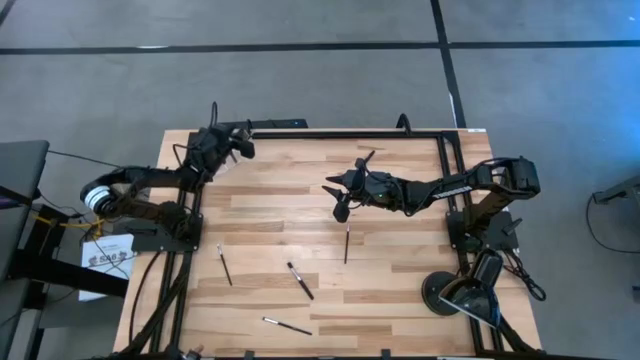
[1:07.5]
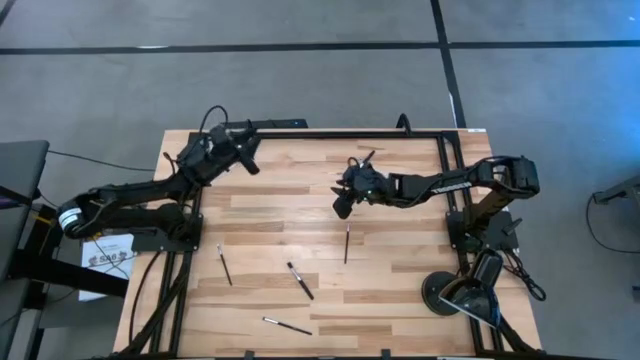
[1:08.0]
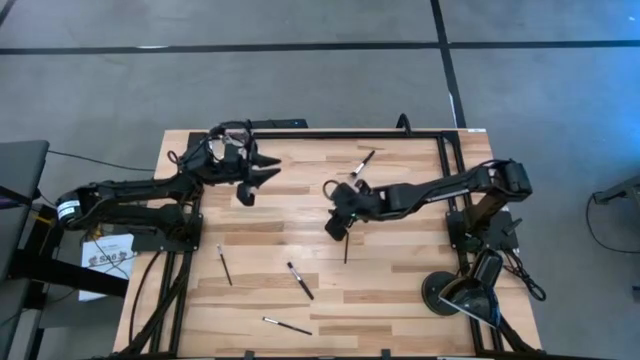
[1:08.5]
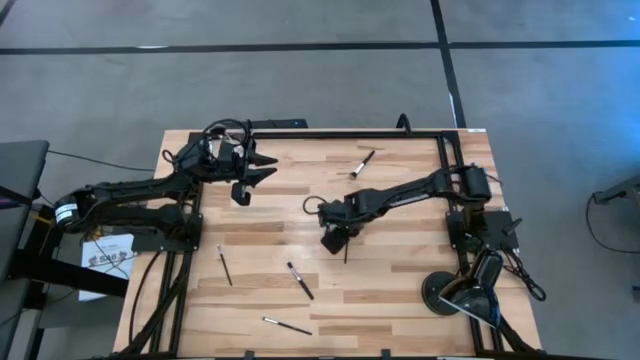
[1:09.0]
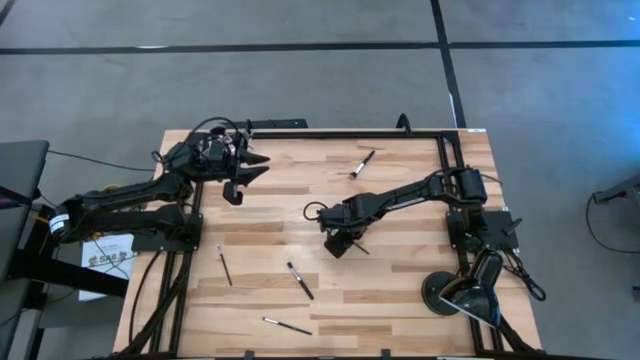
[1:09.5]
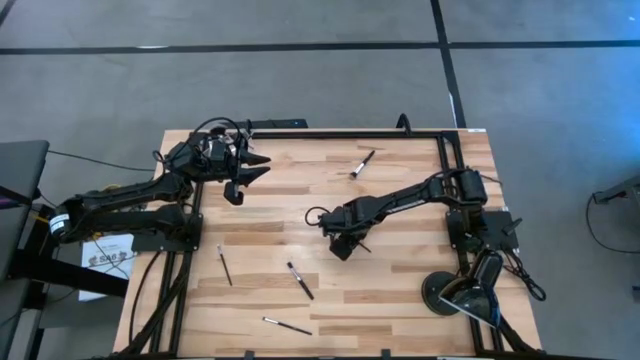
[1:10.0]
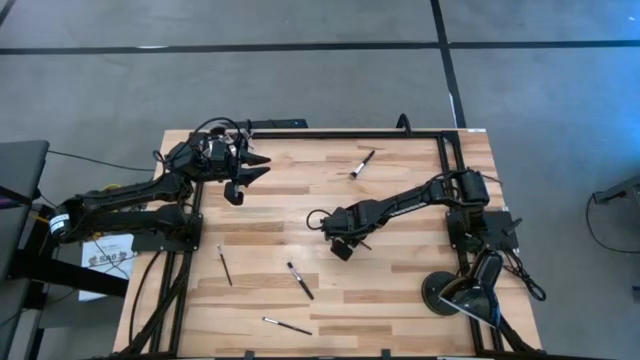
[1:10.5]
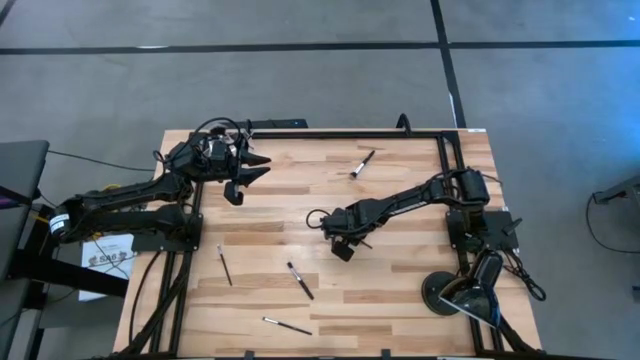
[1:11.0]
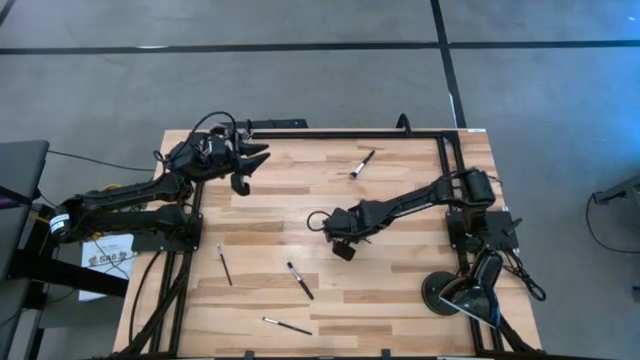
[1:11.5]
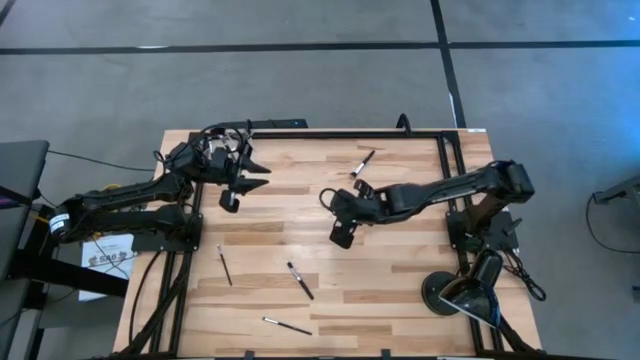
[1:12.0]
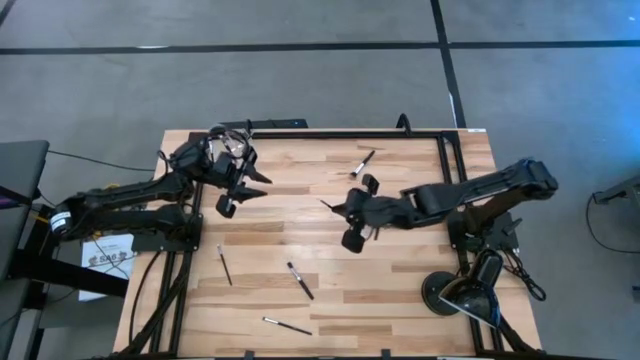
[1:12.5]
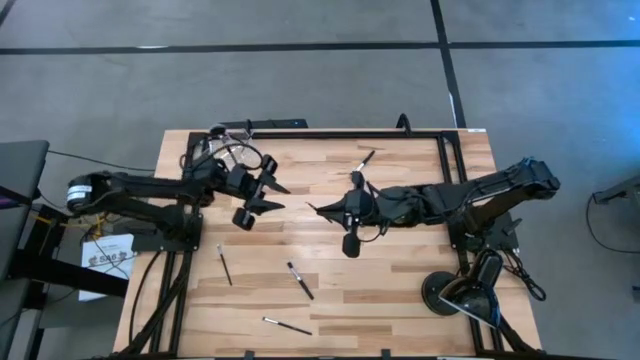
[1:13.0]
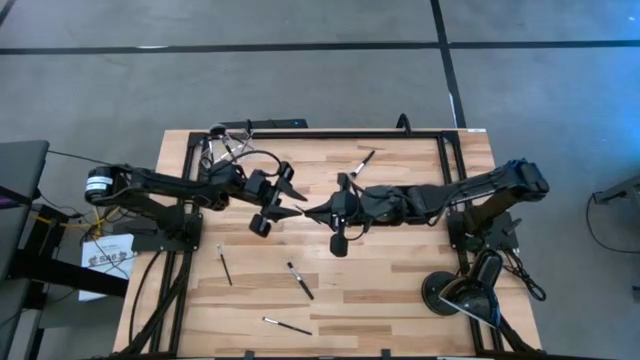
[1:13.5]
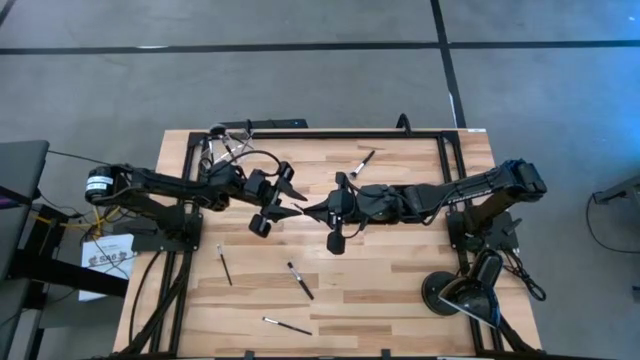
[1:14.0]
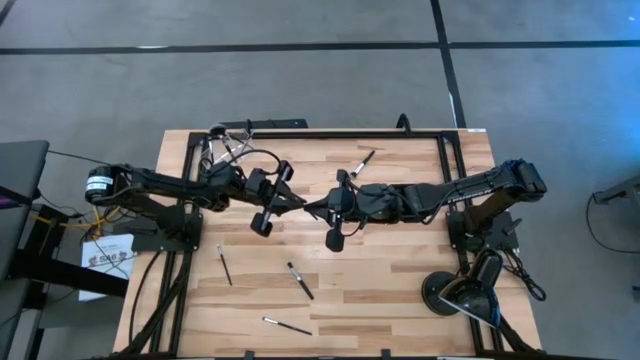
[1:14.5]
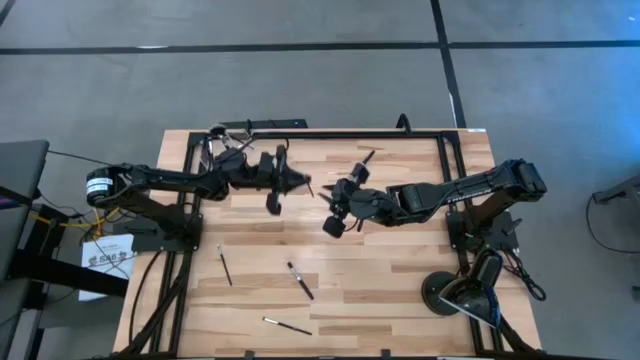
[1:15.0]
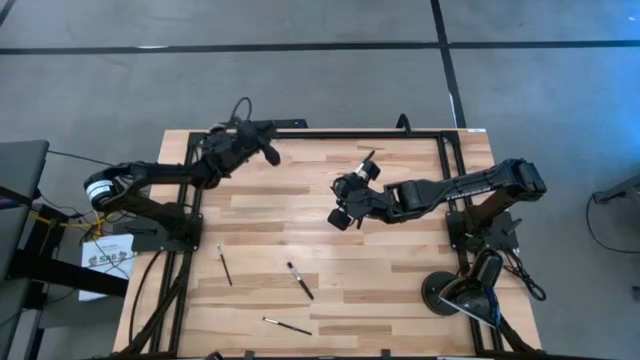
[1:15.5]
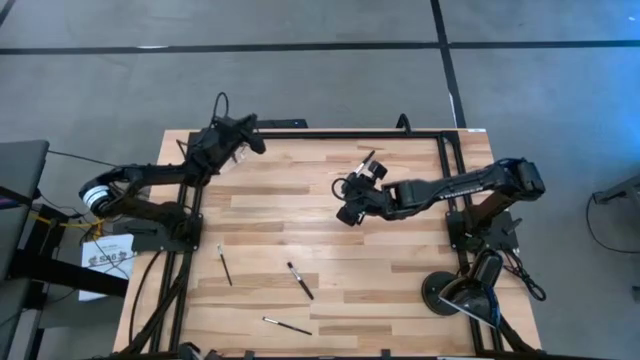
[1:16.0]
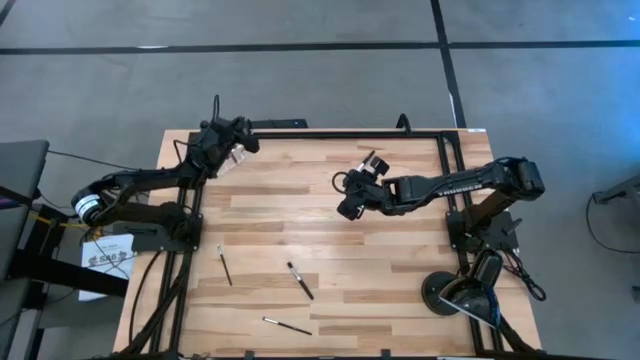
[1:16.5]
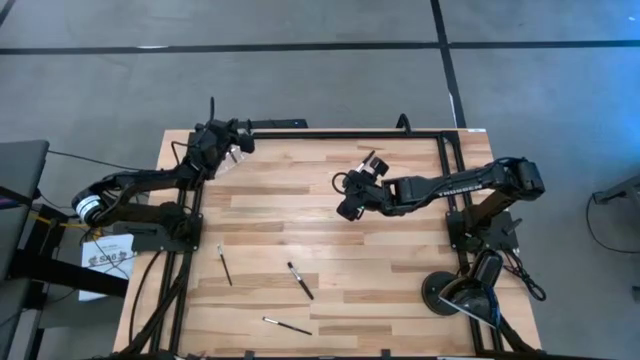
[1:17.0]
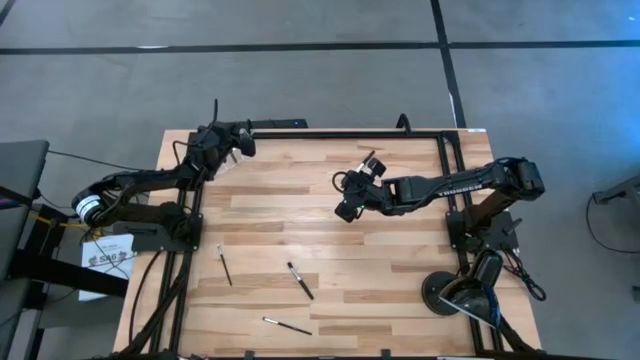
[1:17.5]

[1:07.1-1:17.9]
Task: Put items in baskets/containers
Put the liner brush into the transparent bin

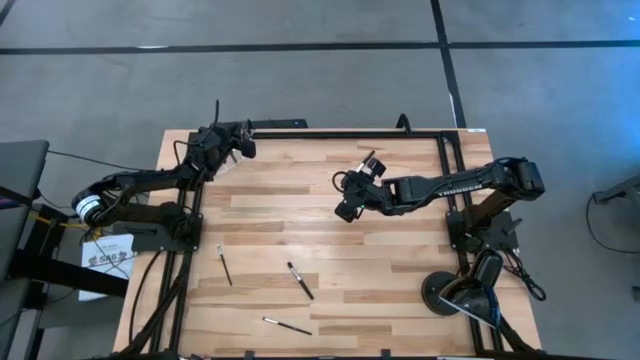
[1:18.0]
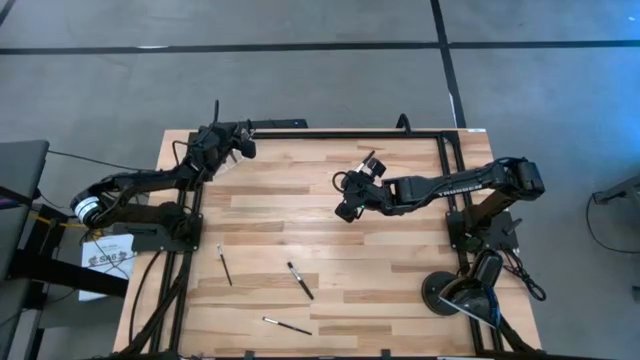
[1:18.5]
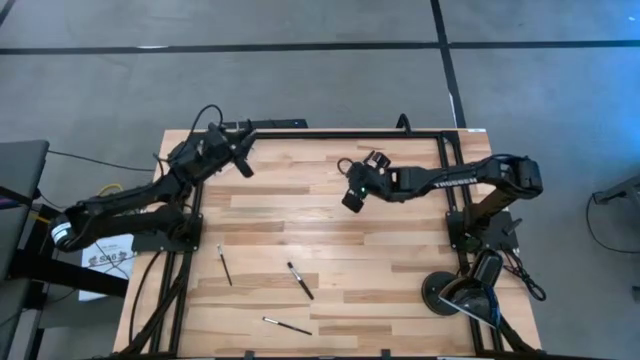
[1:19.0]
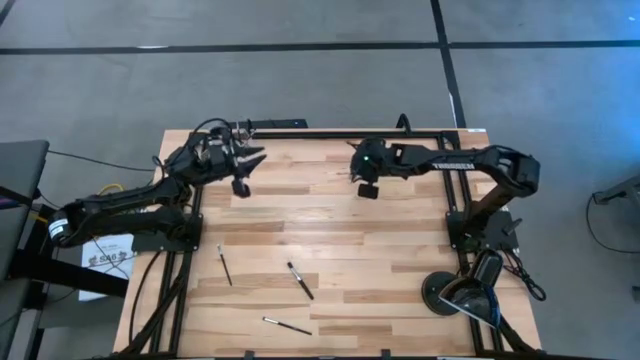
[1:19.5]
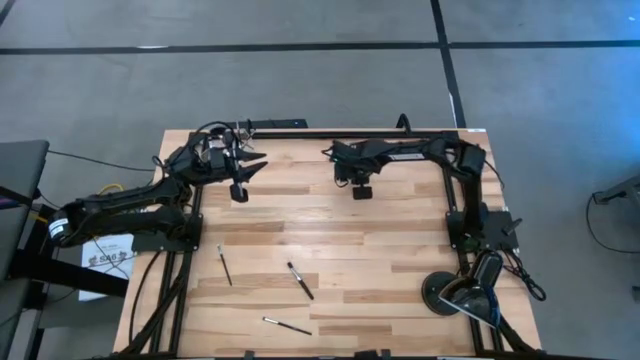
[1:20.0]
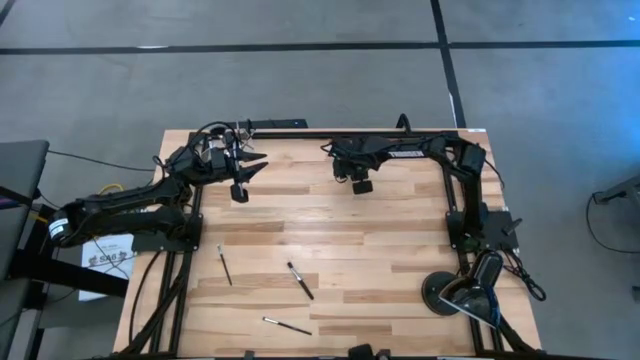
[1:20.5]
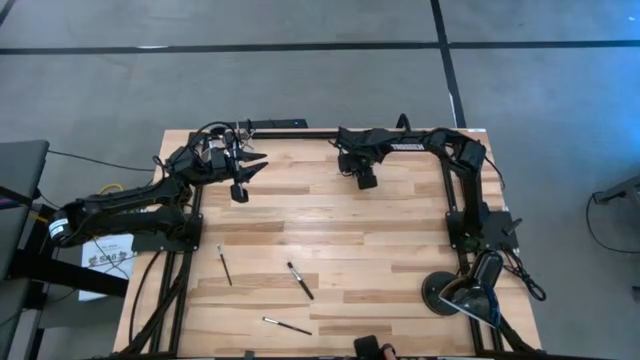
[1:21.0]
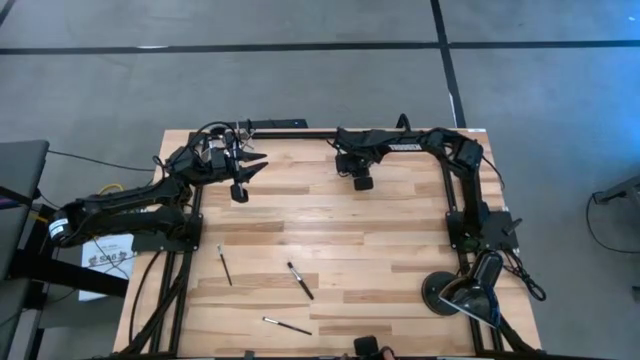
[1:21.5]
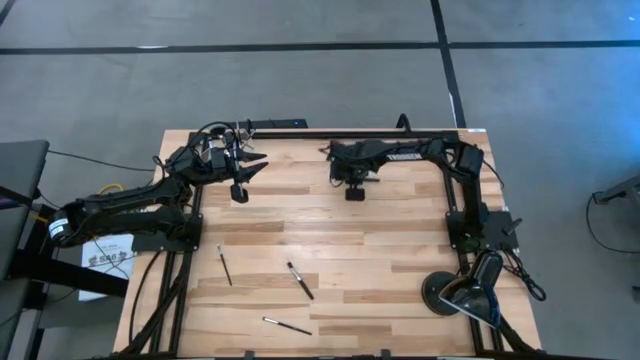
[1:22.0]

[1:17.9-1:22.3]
Put the powder brush into the transparent bin

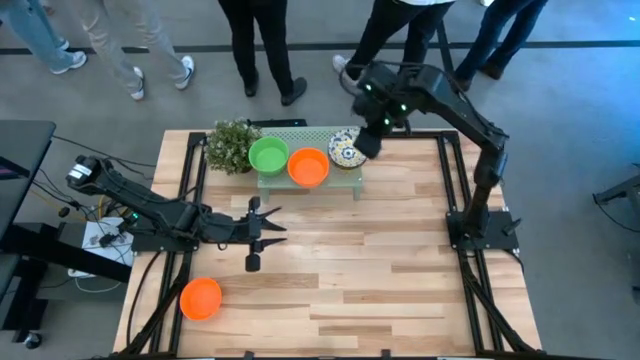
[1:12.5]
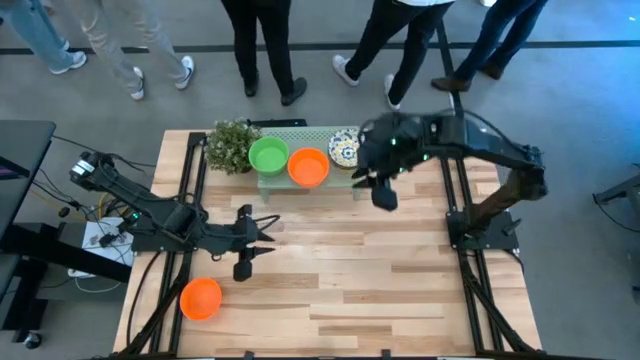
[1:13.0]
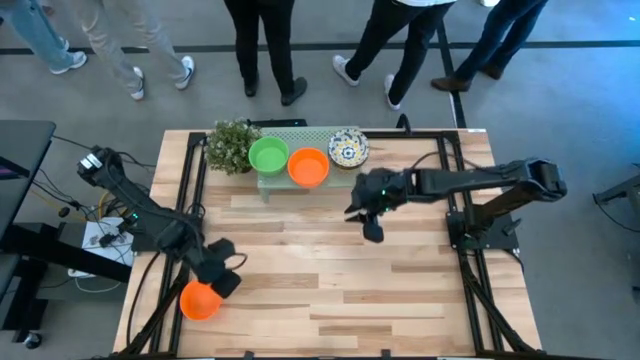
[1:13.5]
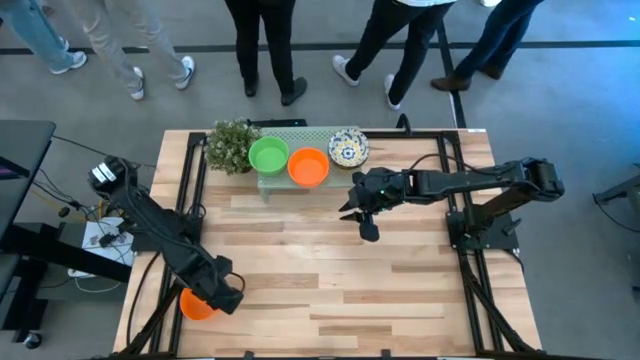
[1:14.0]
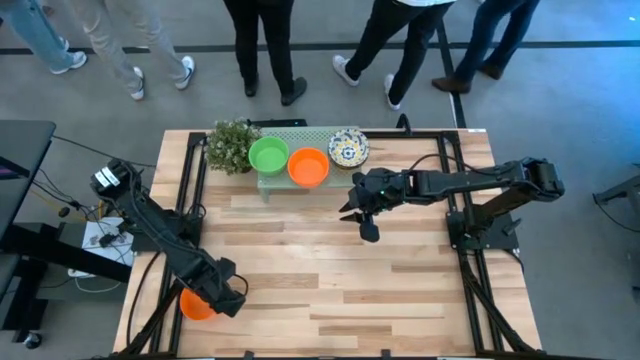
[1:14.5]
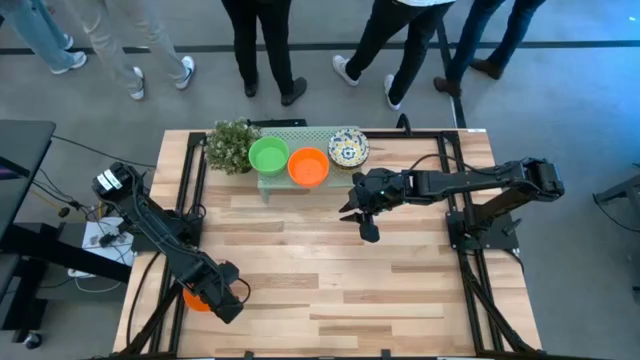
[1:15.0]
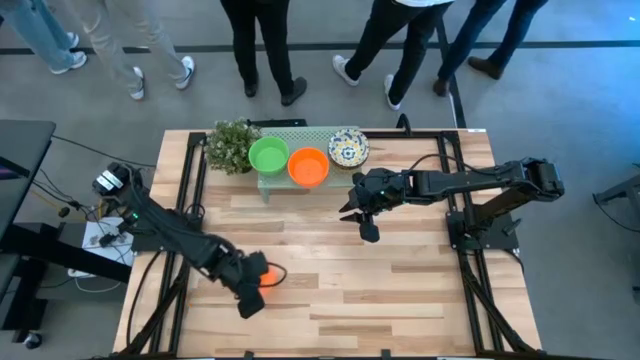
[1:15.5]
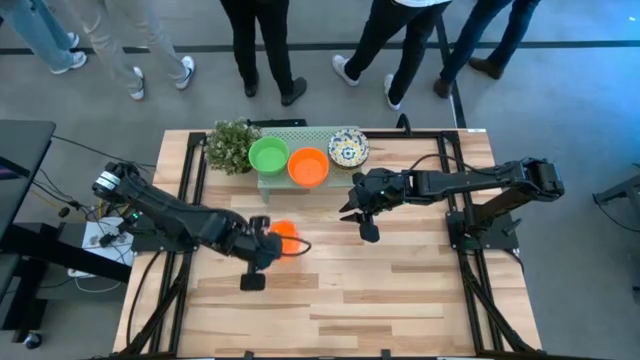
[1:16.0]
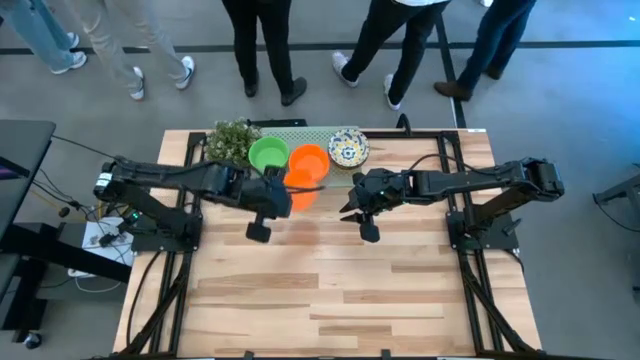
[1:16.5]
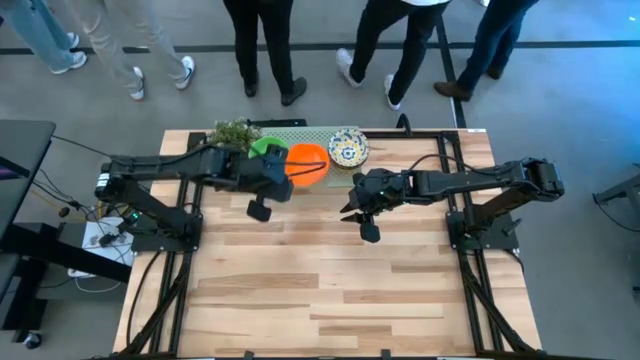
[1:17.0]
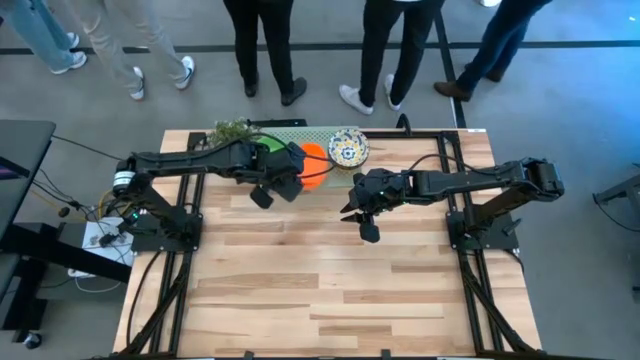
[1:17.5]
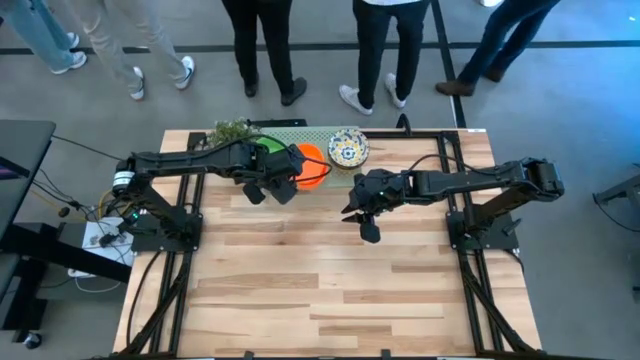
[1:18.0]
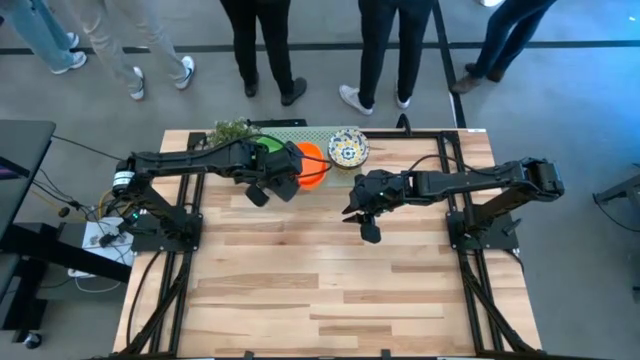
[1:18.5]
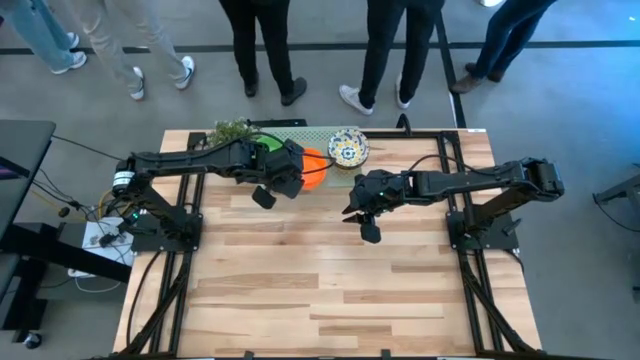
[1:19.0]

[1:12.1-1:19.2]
Task: Pick & Place Mini bowls
Stack the orange bowl on top of the orange bowl on the shelf
